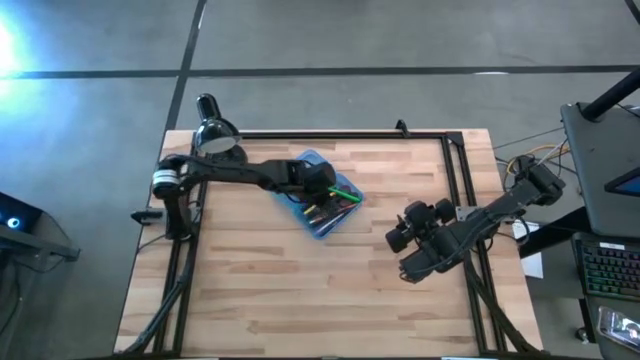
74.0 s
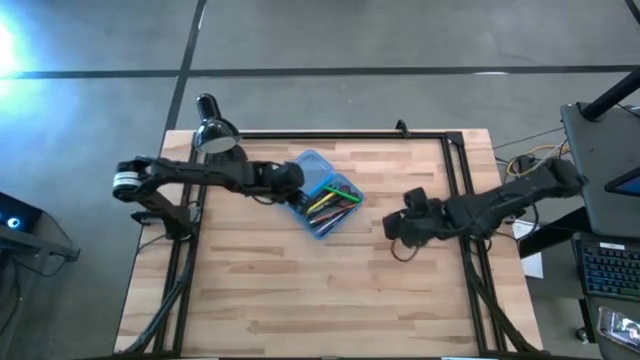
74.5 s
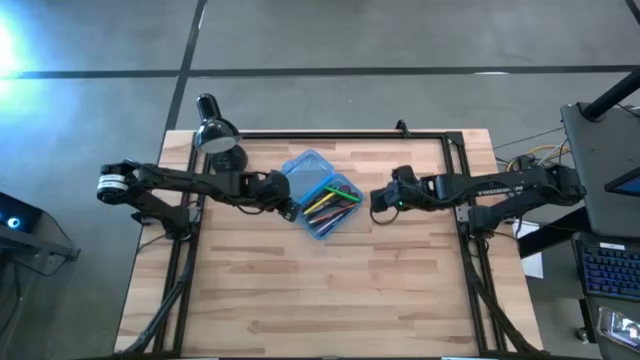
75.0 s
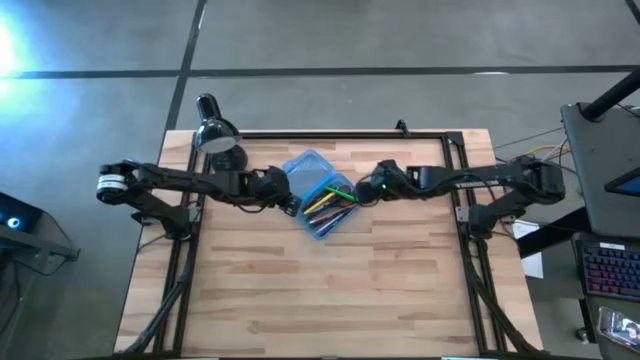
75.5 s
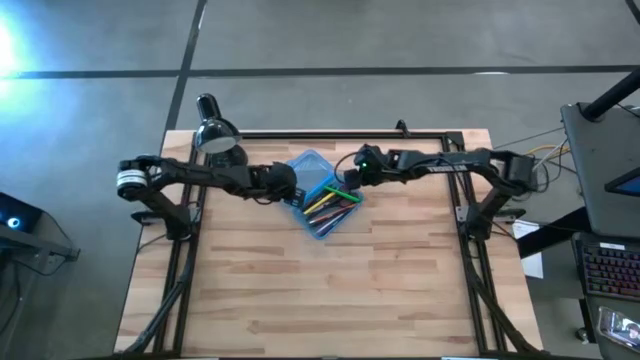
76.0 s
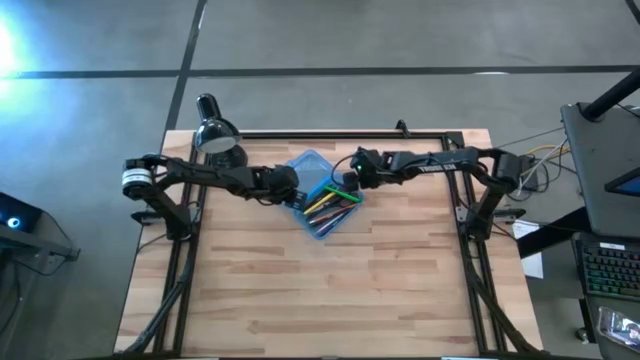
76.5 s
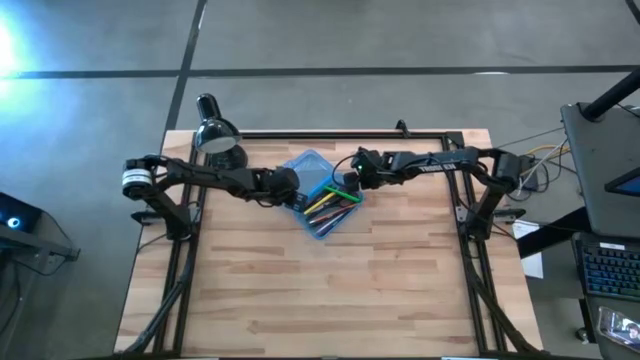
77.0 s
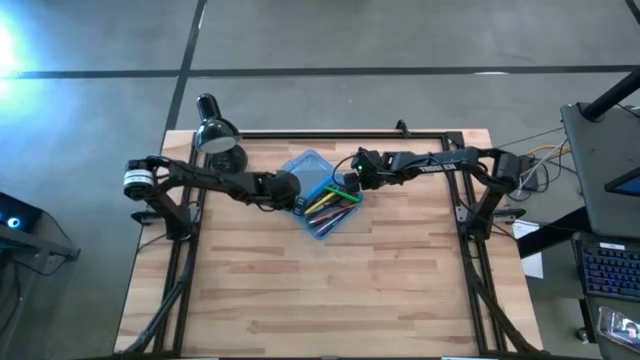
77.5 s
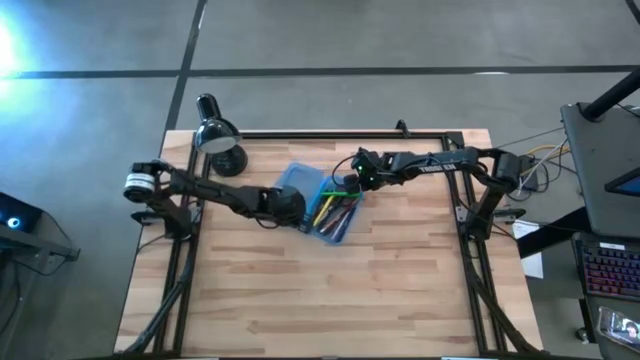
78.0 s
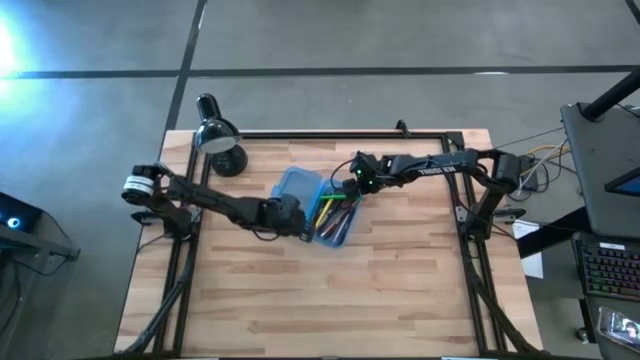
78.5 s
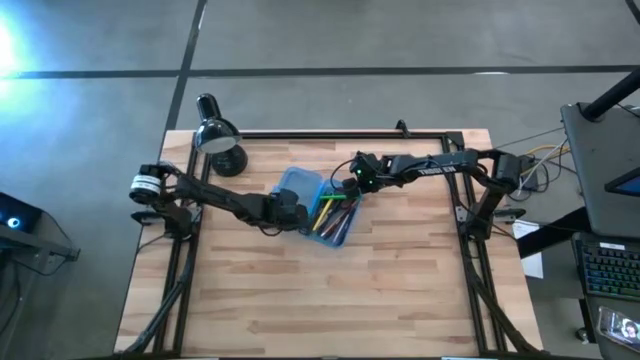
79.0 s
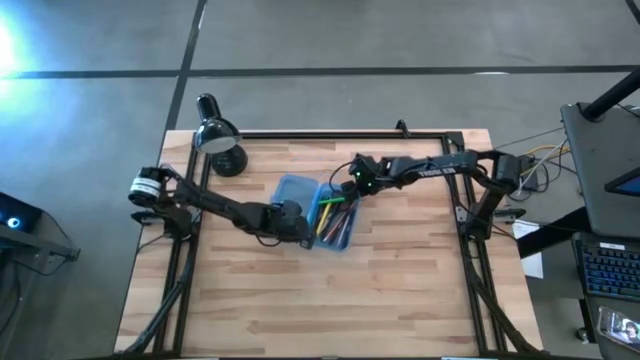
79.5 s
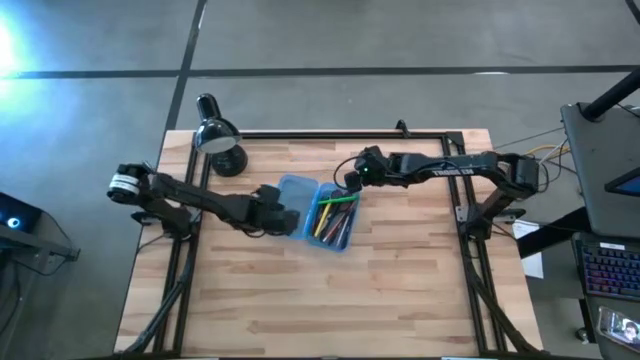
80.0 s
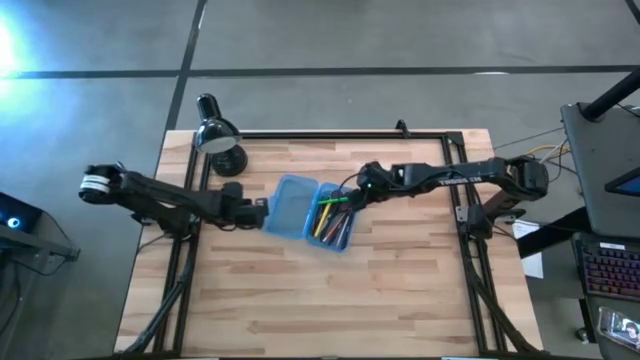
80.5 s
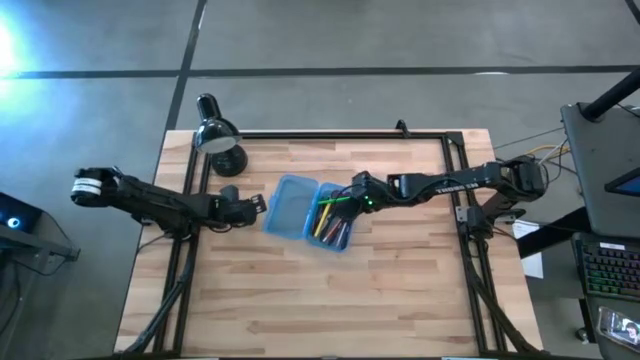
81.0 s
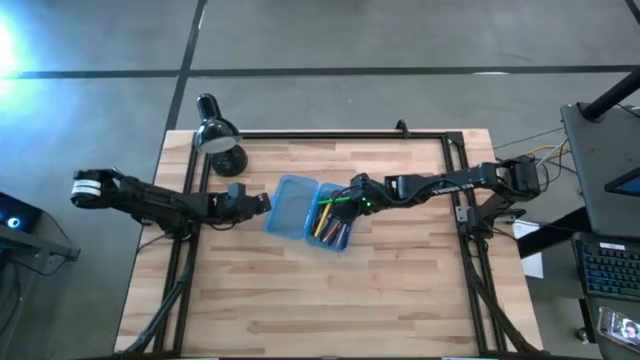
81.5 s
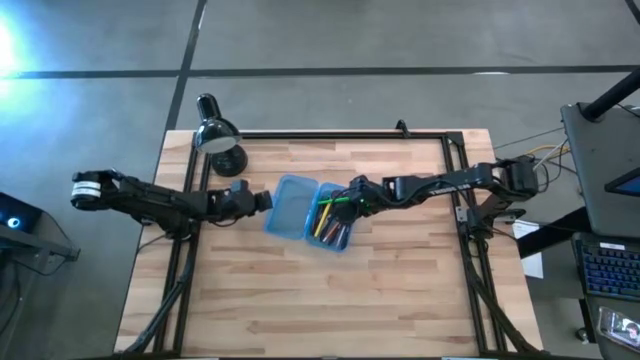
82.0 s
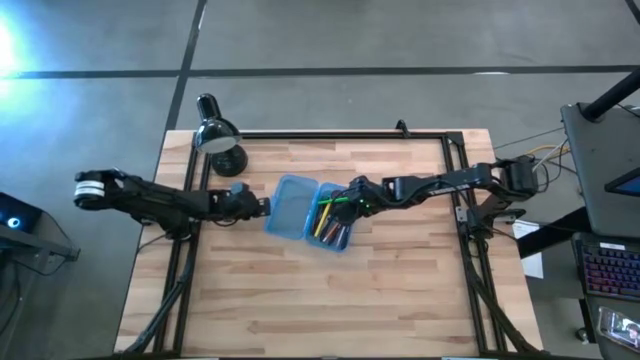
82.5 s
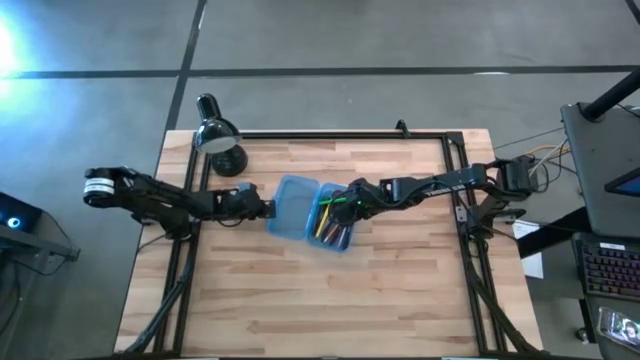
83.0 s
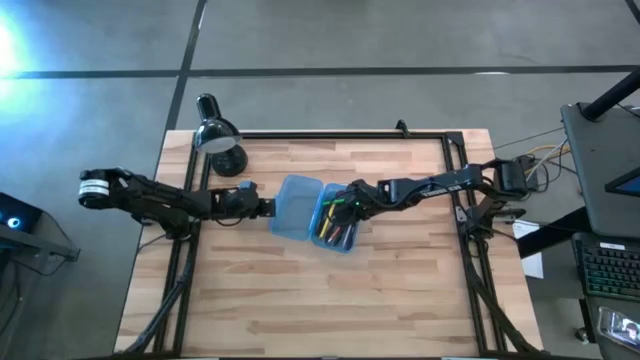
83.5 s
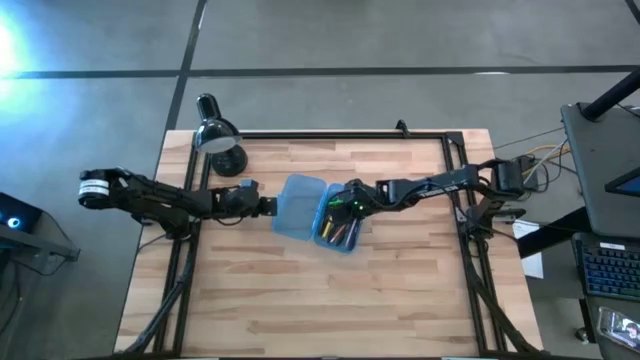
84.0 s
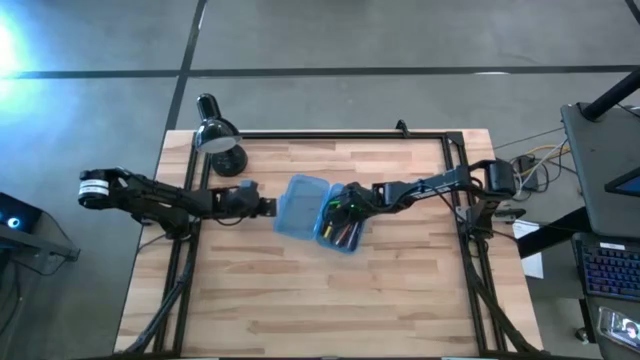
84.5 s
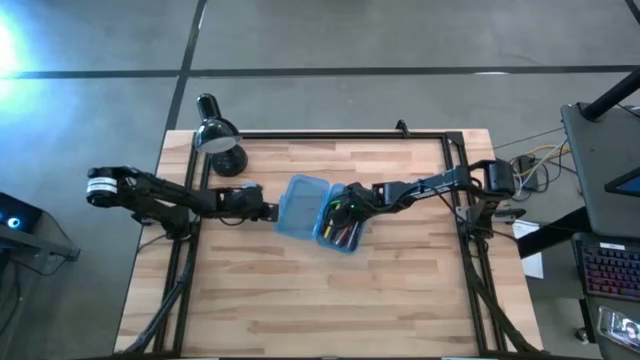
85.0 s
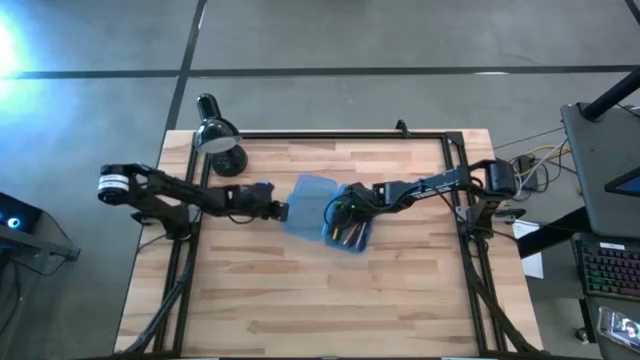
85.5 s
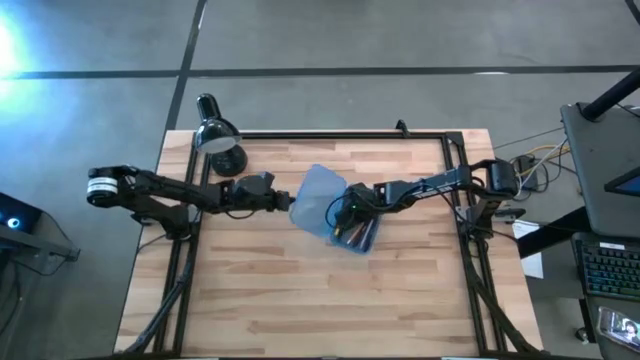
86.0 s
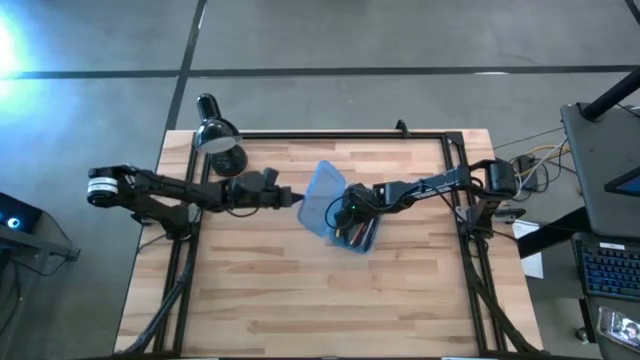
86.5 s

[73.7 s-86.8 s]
Task: Pick & place school supplies into a supply box
Close the supply box

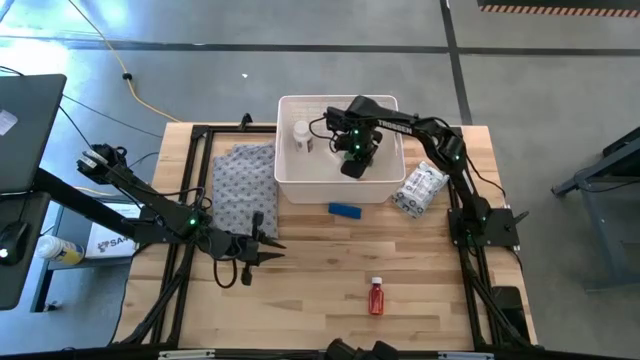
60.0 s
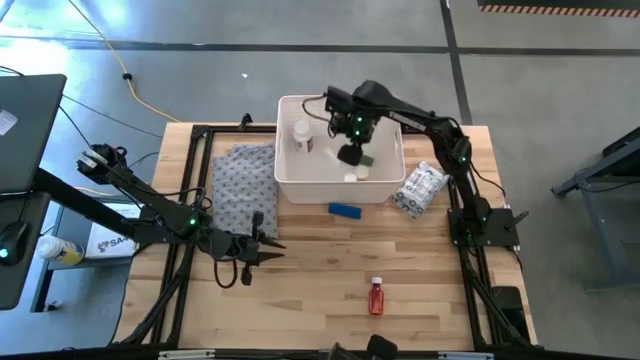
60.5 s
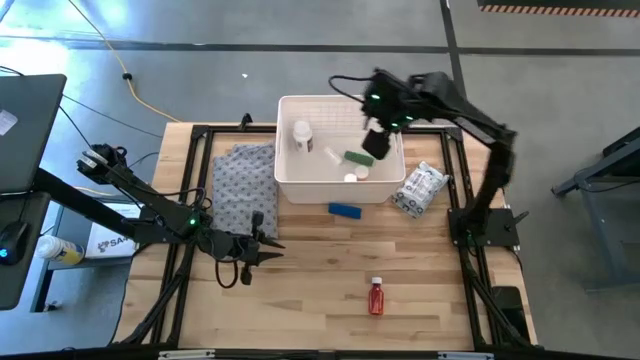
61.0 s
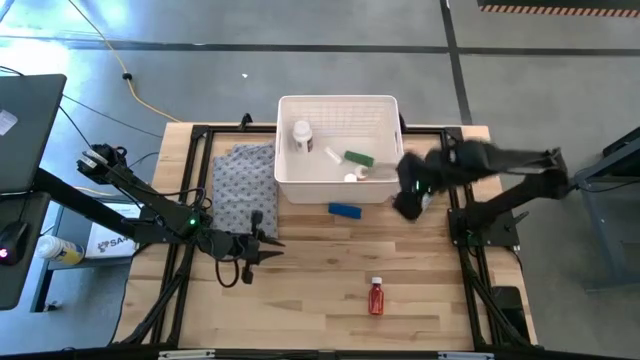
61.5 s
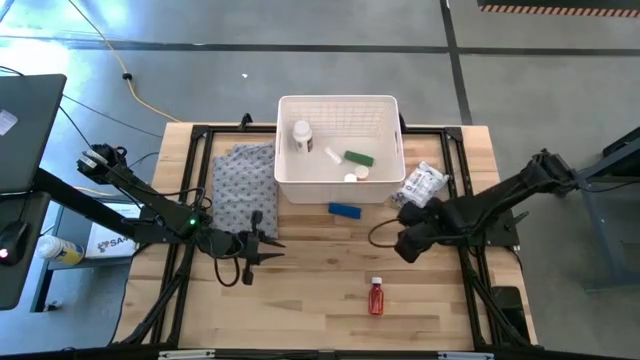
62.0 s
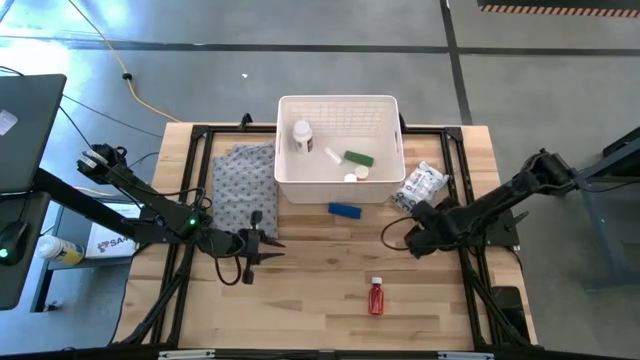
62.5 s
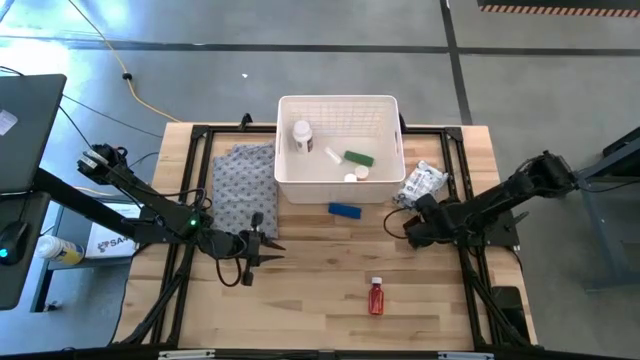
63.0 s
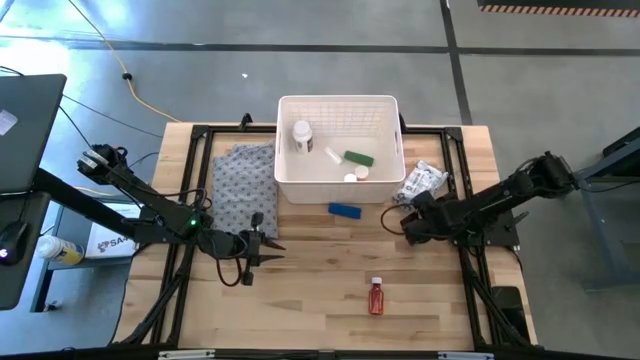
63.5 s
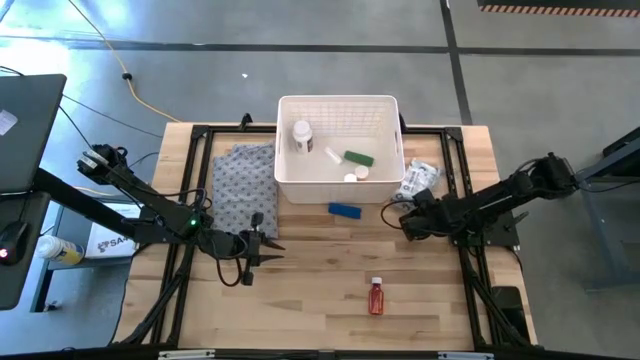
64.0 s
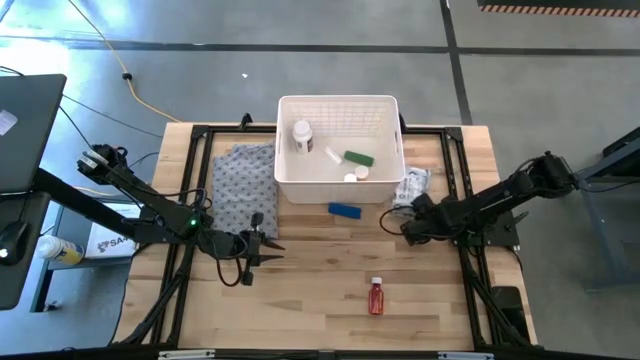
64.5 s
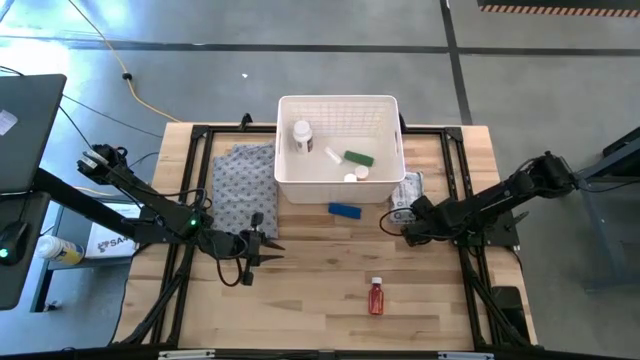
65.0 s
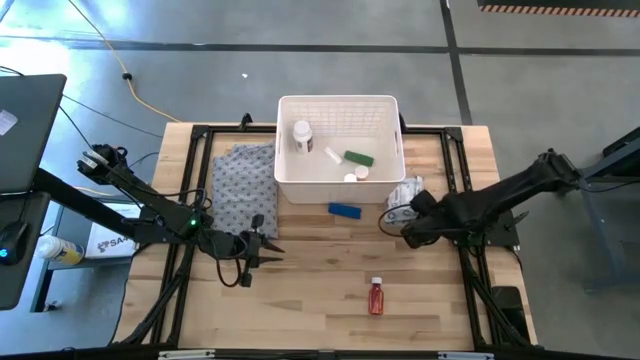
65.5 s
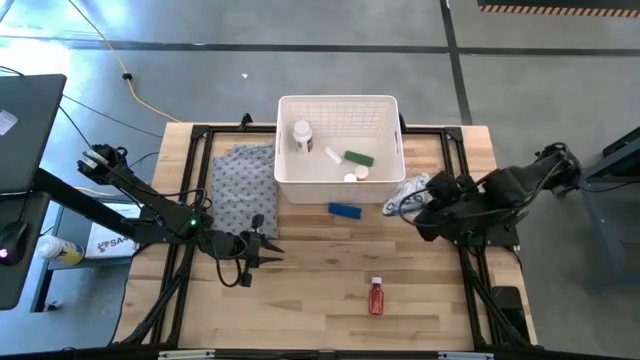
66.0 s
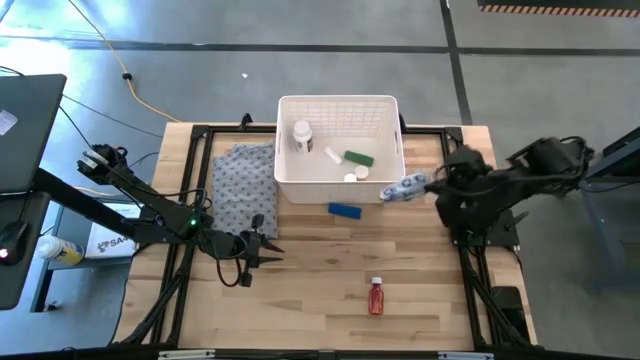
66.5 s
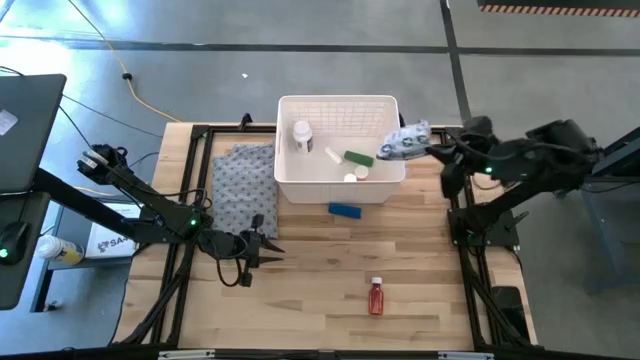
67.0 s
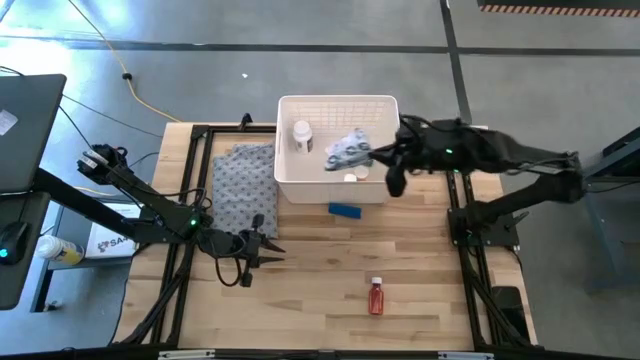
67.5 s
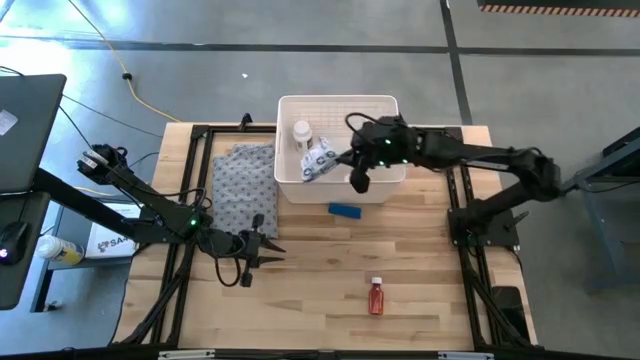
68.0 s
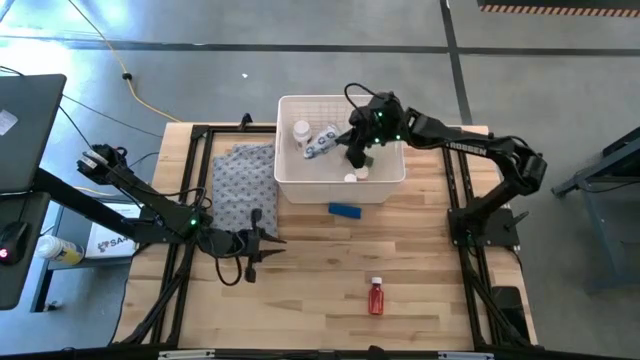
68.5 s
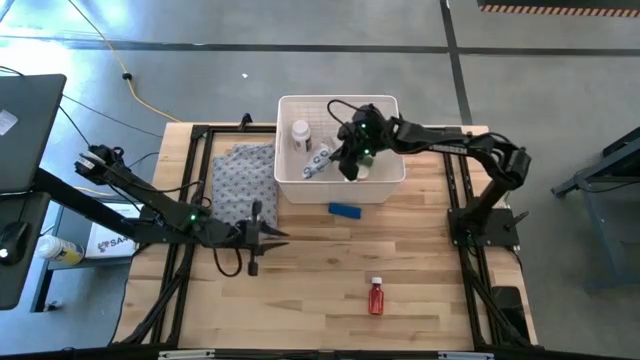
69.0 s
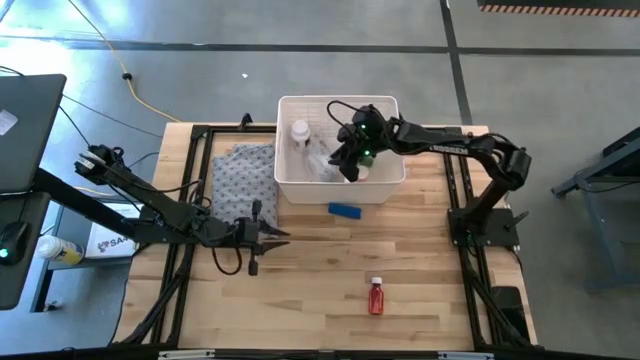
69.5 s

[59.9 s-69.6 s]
Task: Pick & place medical supplies in basket/bin
Put the mailer bag into the white bin
